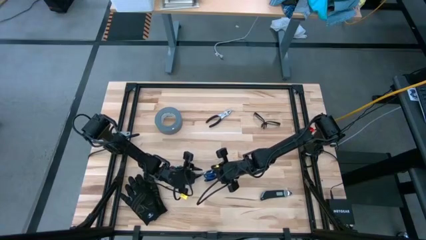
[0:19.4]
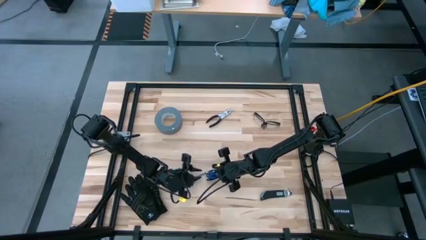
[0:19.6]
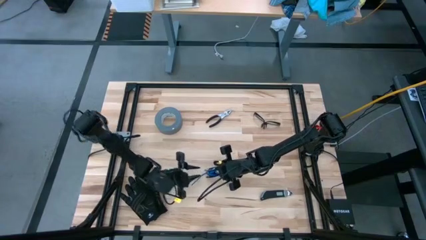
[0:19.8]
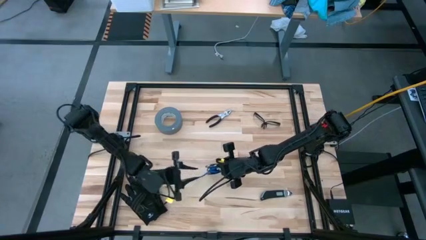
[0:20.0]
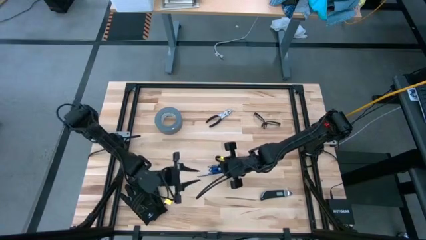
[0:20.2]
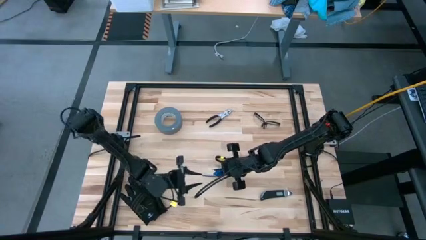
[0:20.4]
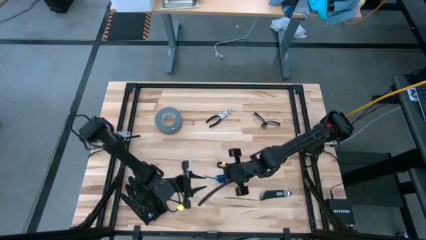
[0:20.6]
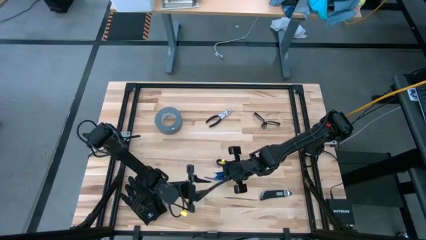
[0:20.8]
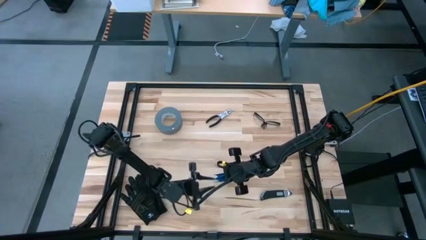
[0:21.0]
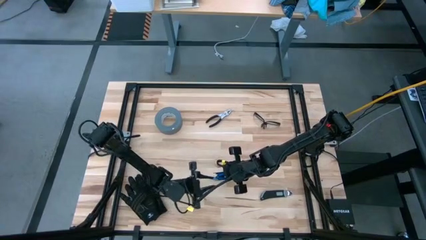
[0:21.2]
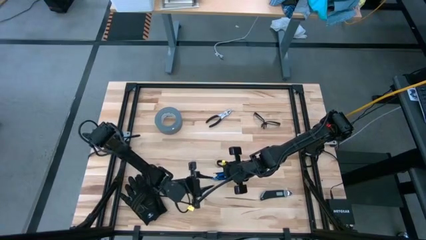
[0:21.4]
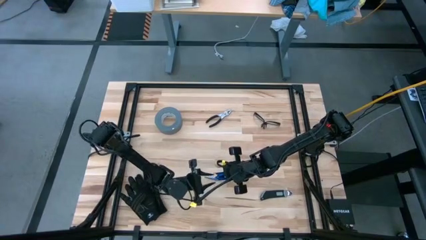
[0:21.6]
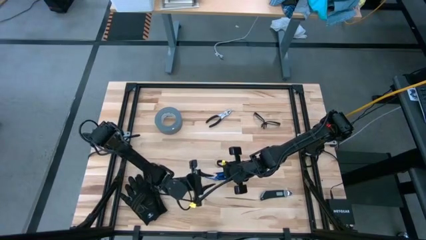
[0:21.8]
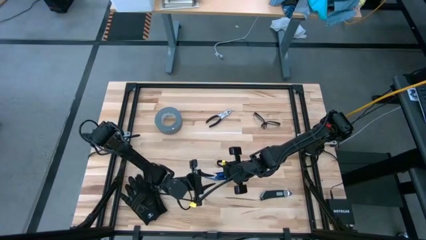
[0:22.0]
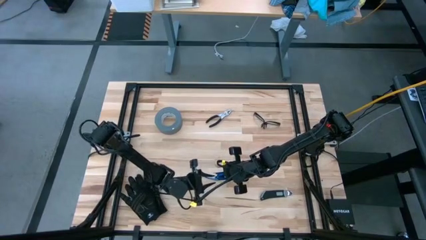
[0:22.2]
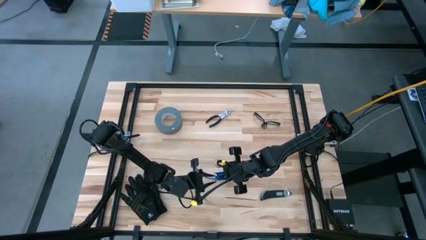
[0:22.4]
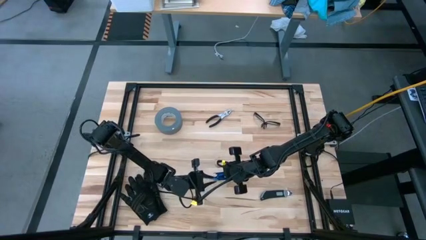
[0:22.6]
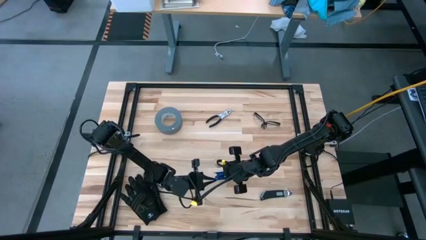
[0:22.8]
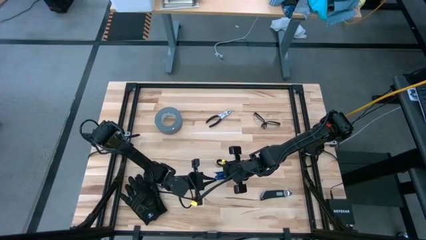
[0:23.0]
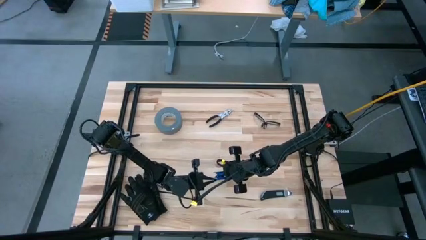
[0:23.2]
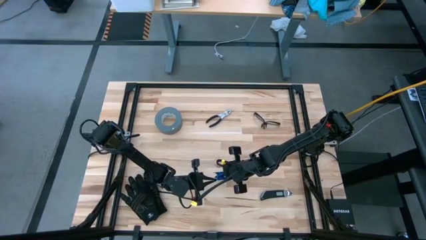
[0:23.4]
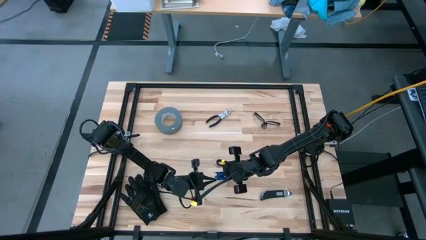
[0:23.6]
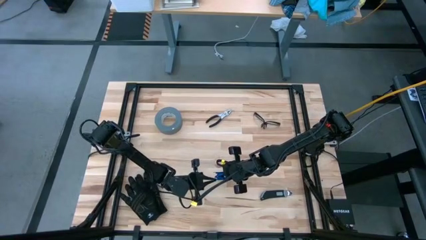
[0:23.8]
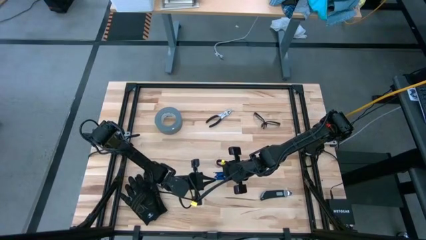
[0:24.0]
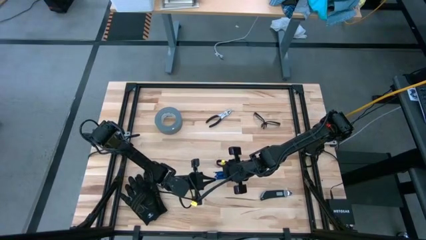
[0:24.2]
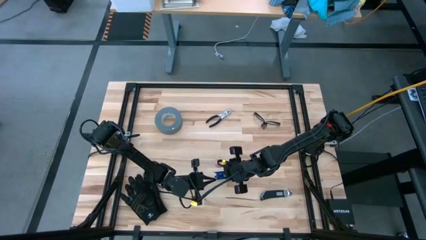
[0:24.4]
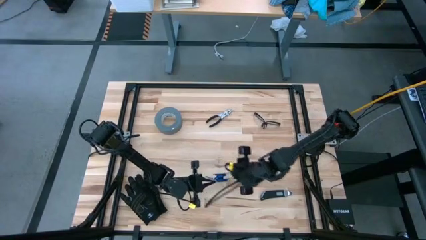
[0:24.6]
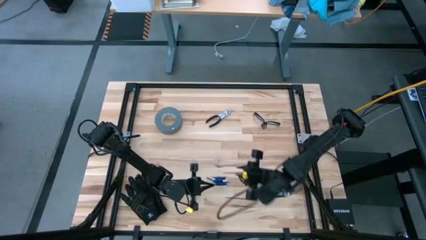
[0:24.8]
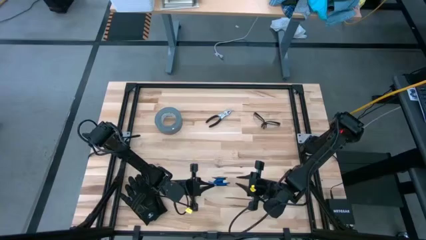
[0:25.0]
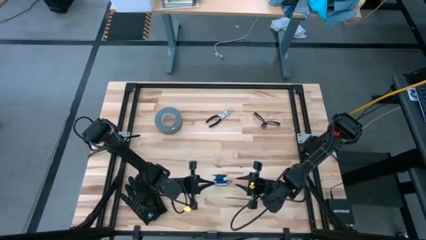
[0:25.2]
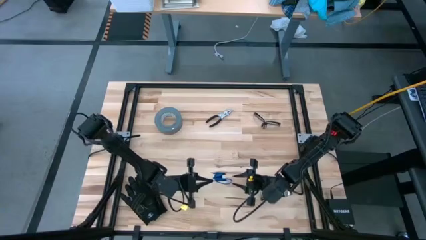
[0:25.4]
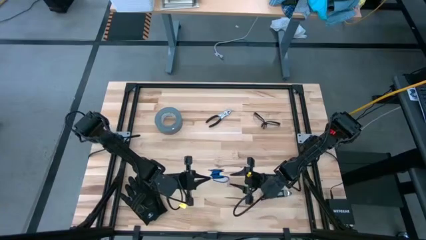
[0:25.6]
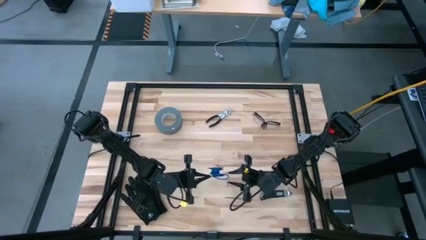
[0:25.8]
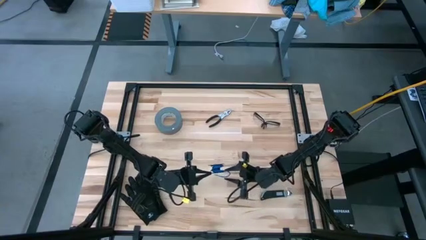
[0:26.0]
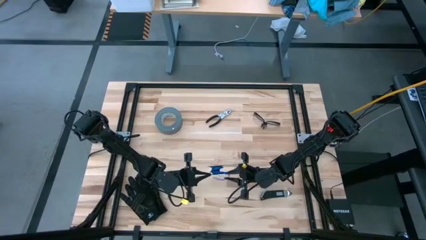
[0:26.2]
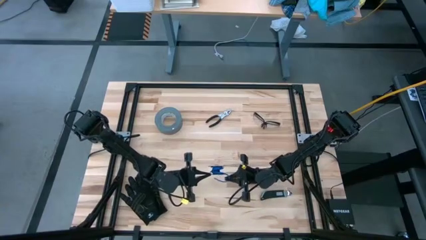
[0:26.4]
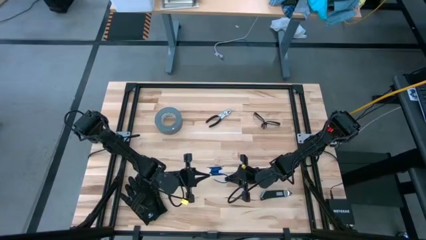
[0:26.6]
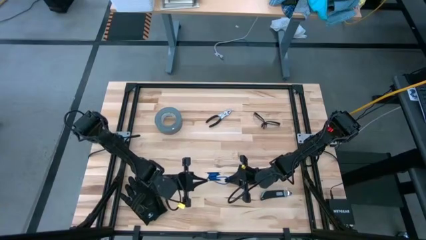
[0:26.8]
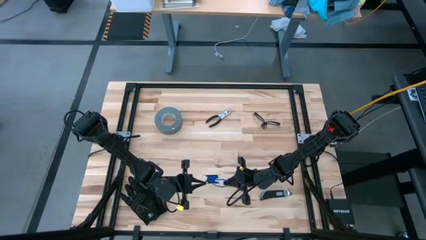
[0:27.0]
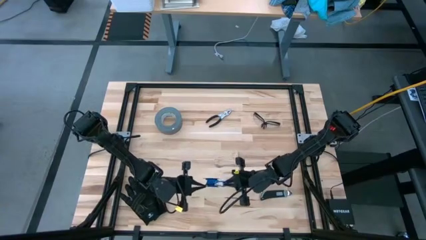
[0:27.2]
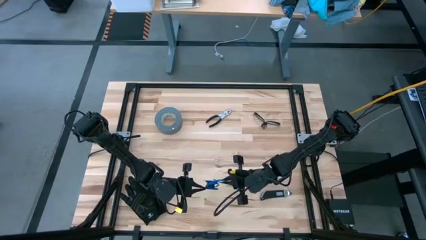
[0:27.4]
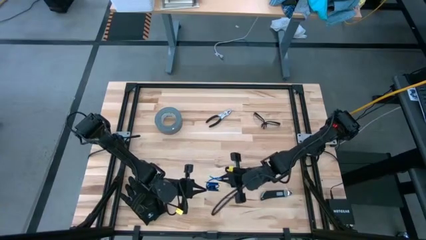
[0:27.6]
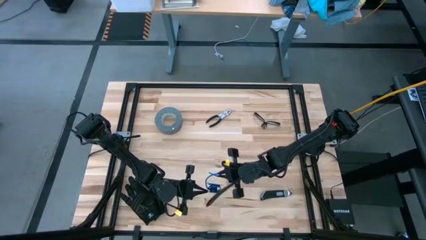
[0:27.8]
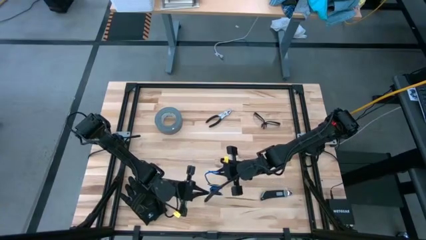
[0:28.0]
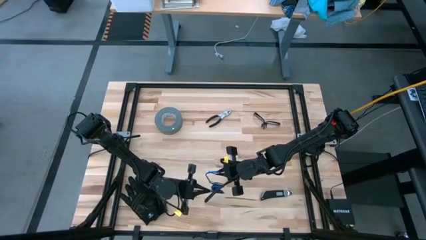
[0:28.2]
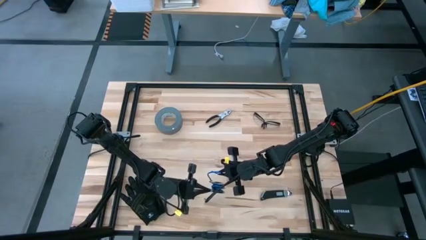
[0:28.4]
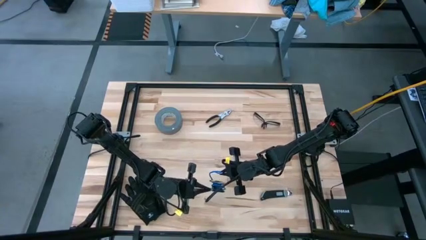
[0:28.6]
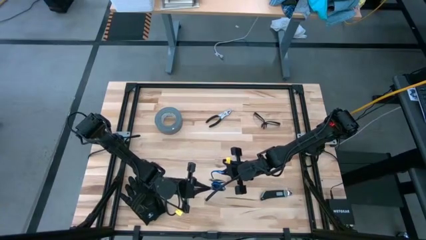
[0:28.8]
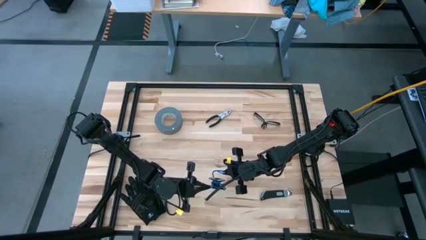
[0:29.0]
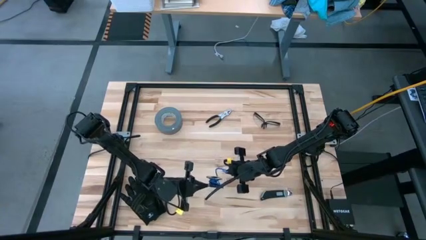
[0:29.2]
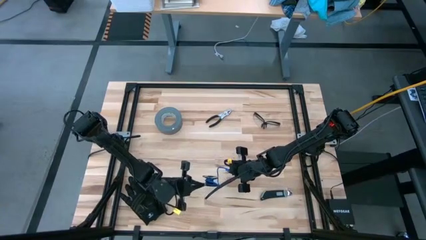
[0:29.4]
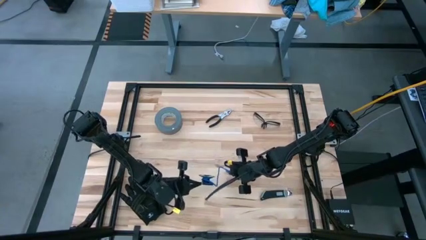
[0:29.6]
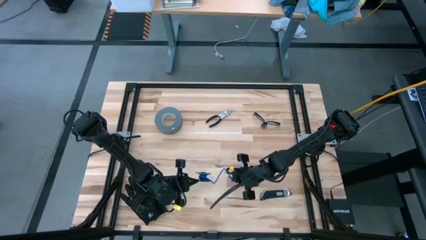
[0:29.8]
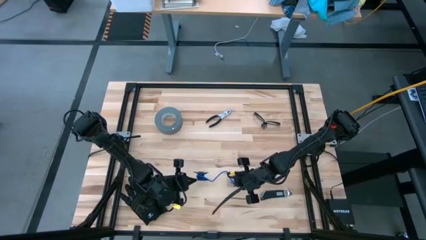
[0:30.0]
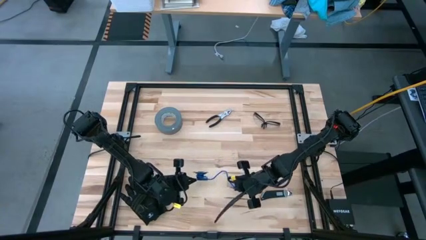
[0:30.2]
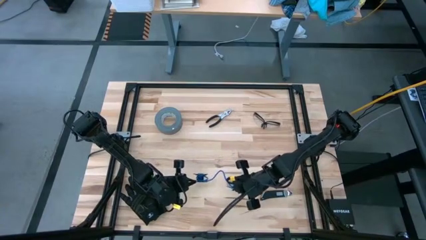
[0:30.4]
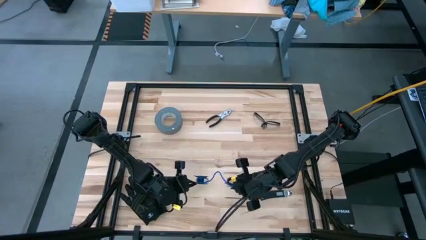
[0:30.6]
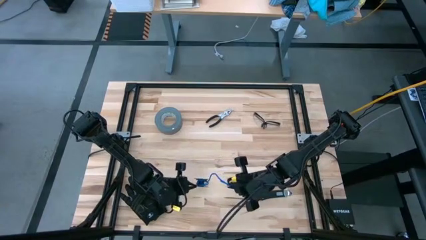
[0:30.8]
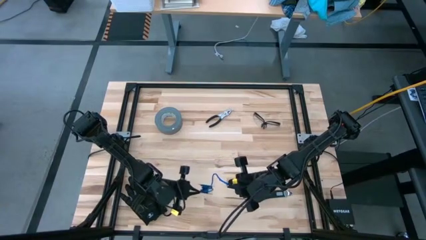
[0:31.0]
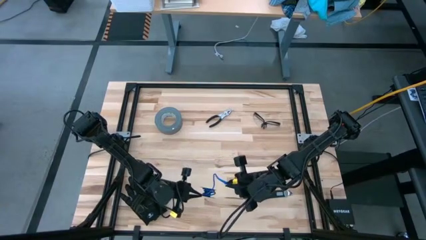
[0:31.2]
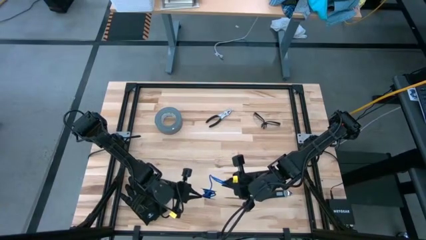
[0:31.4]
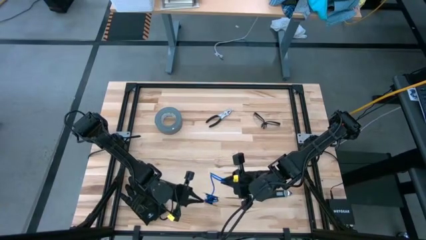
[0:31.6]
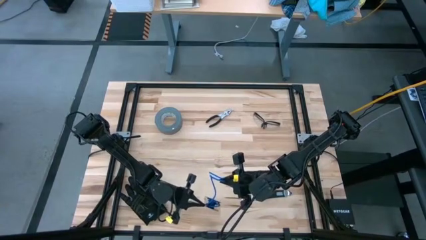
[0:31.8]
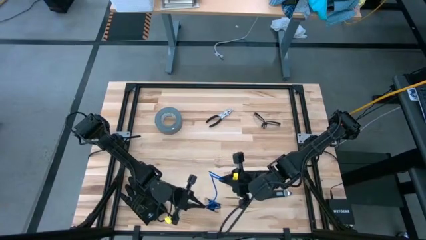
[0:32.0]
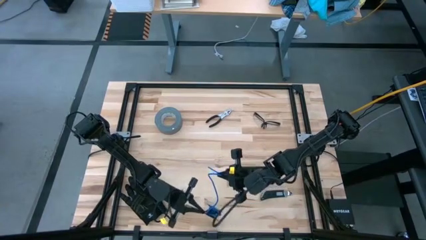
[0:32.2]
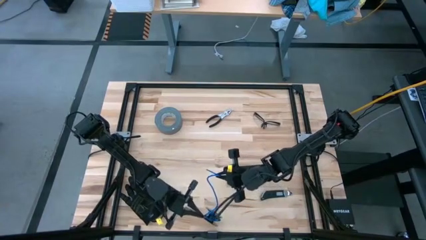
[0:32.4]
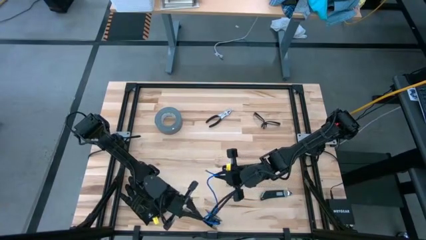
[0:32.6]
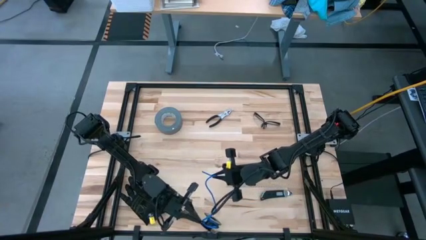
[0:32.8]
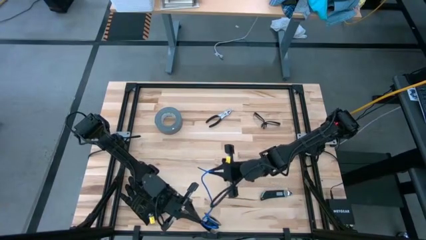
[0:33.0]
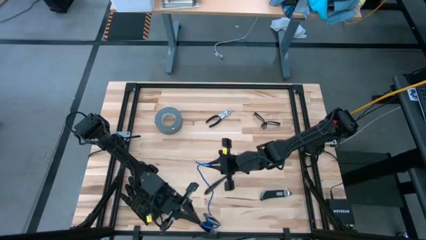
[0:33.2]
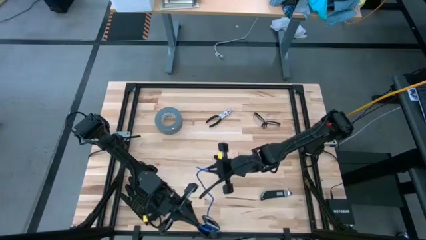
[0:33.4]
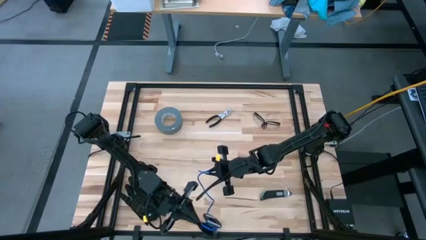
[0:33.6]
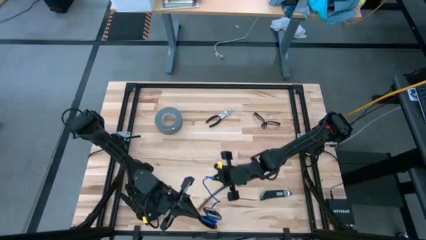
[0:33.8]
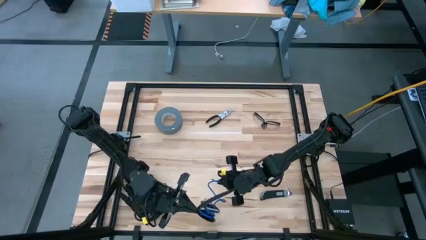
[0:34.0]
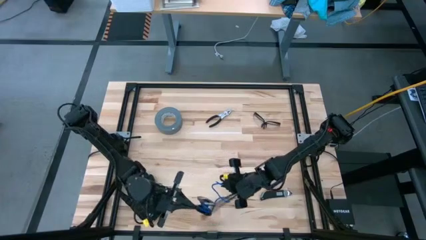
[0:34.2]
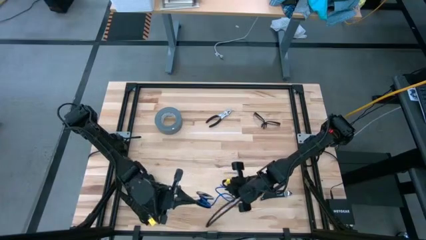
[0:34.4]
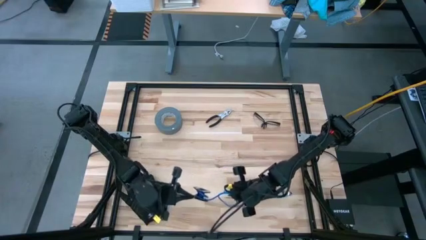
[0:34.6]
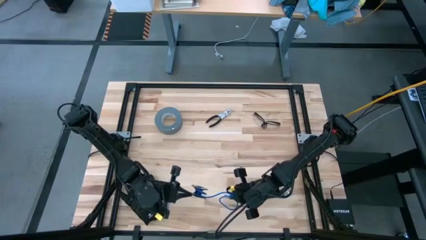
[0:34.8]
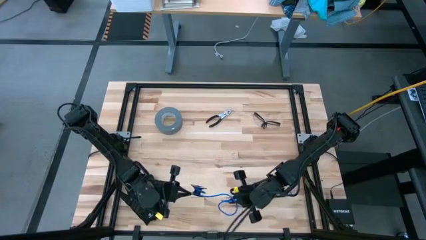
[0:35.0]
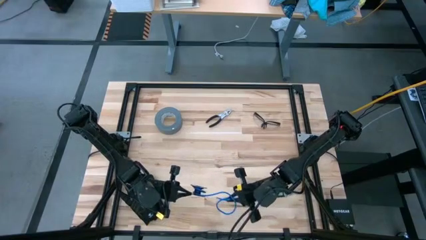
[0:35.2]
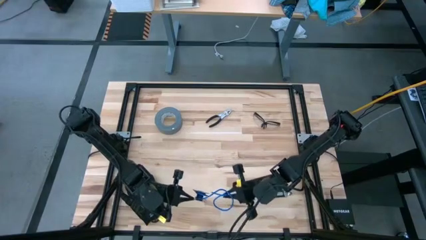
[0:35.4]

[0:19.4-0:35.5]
Task: Coil cords
Uncoil the blue wire cable from the black spool
